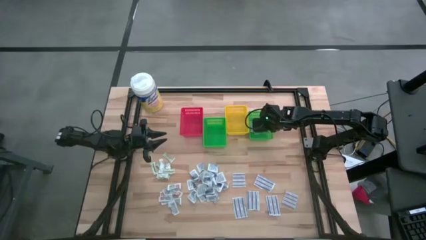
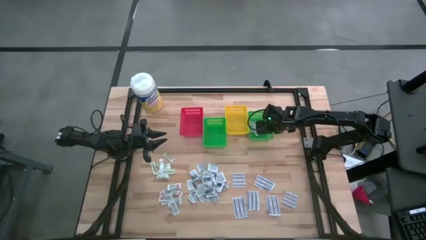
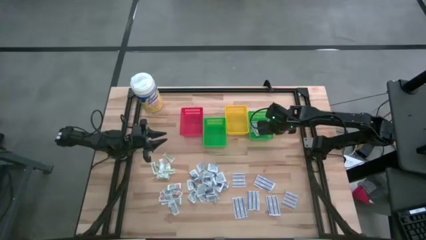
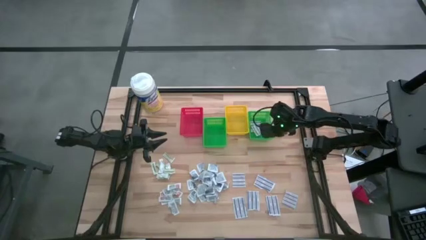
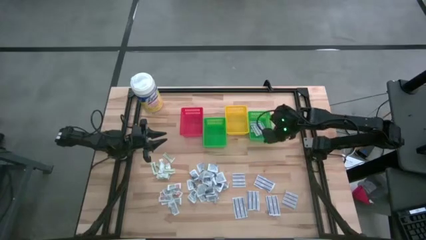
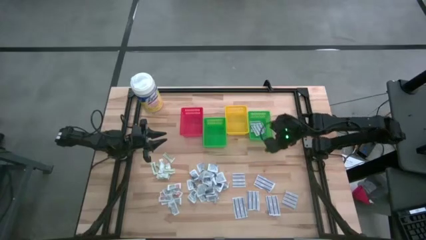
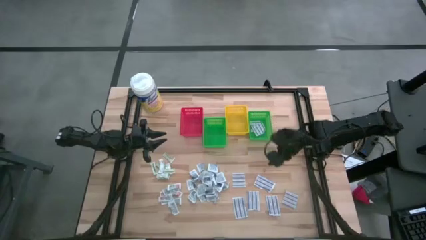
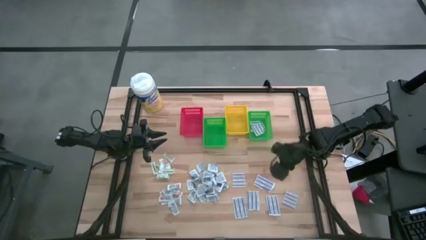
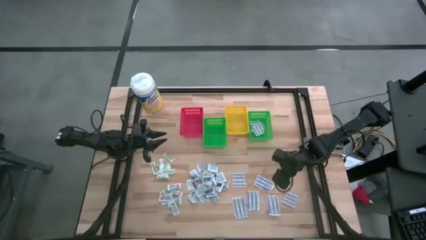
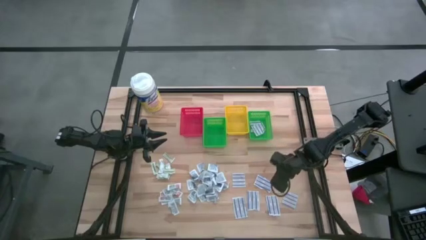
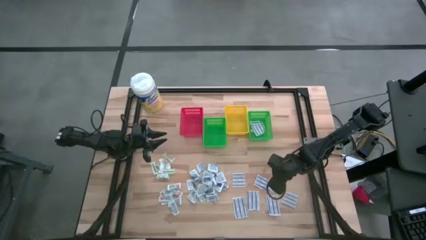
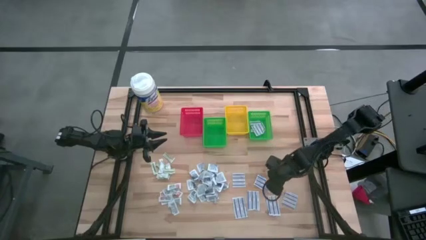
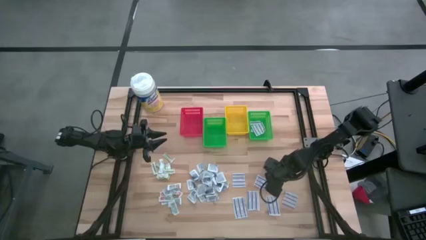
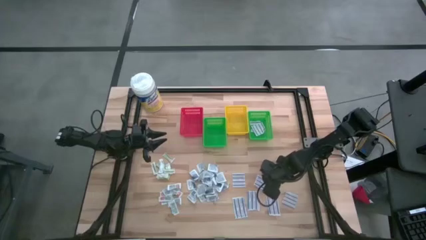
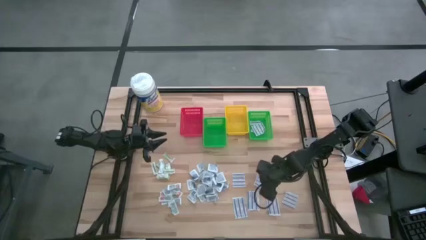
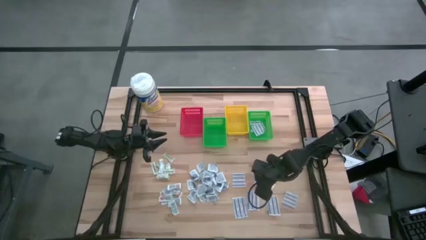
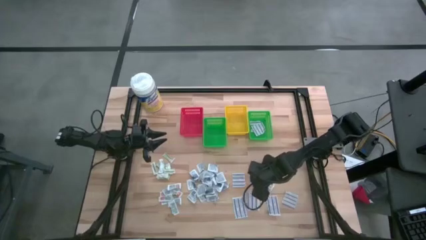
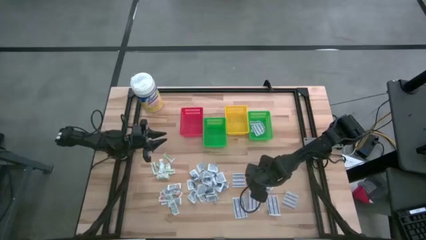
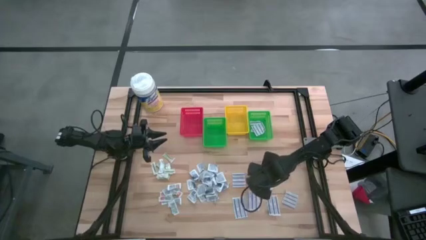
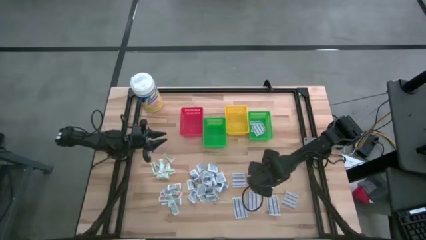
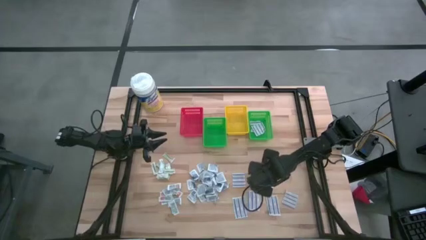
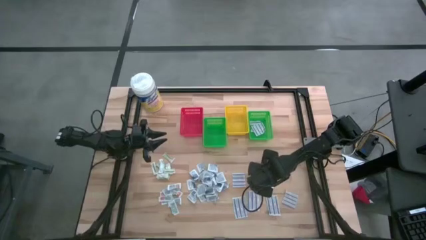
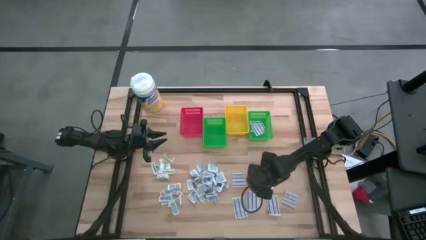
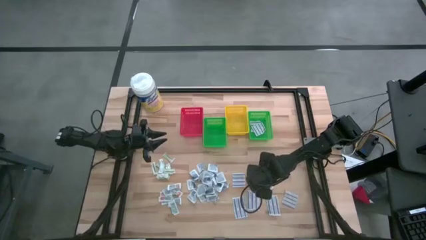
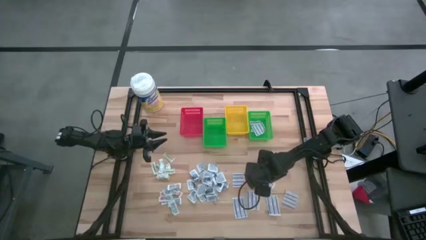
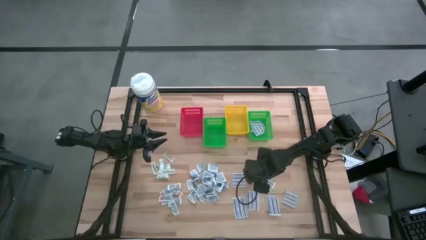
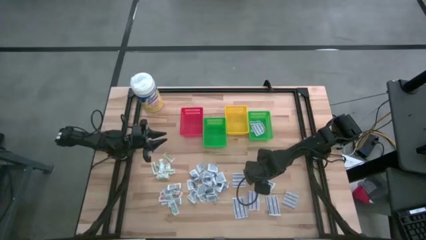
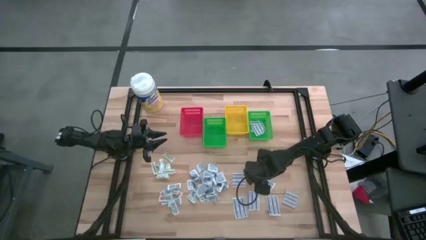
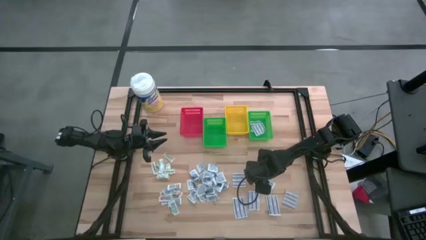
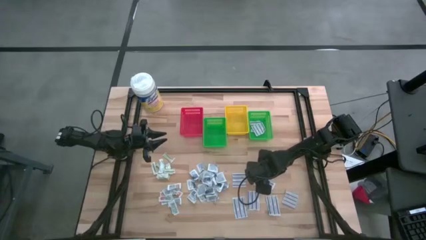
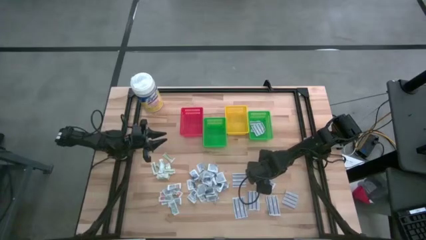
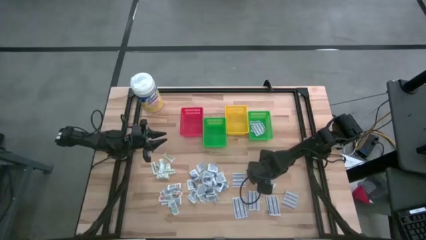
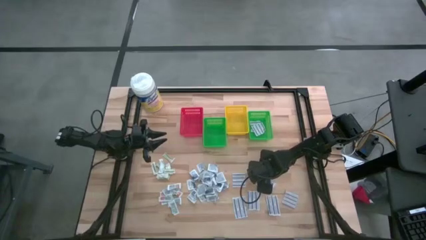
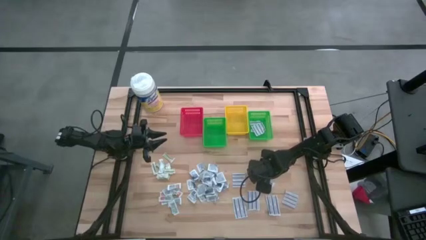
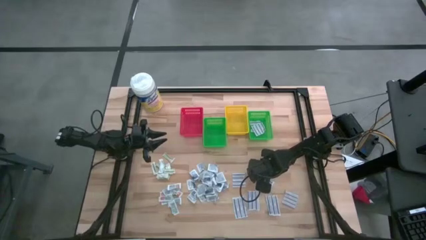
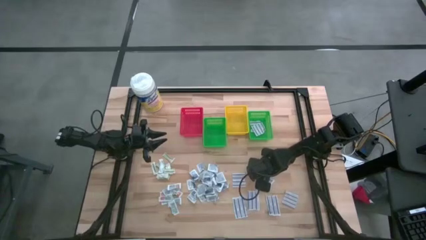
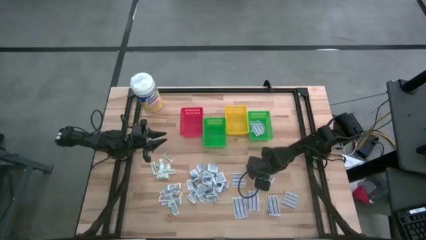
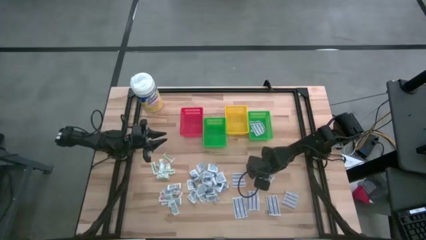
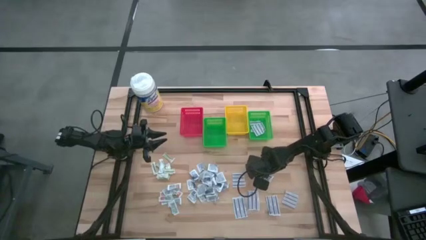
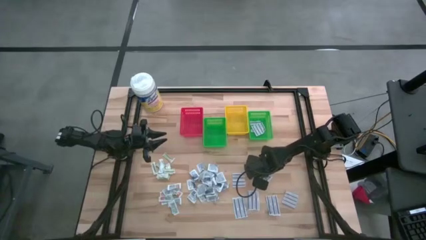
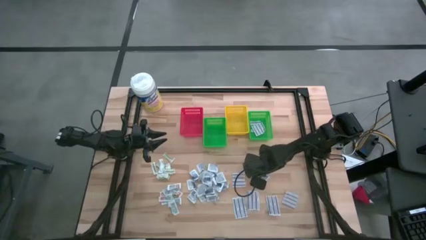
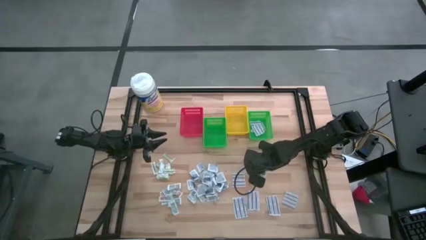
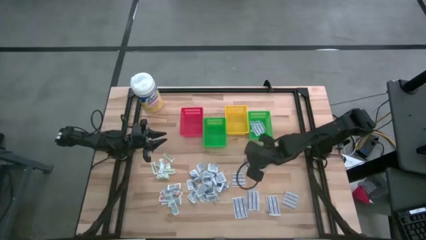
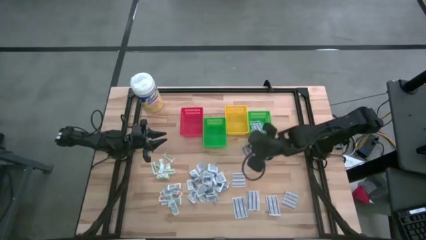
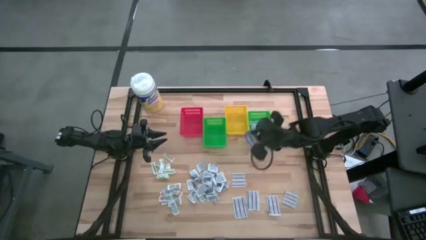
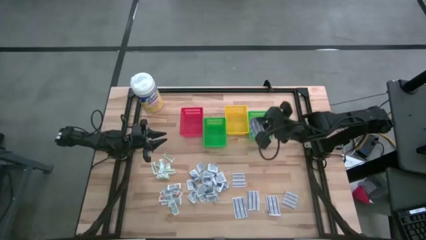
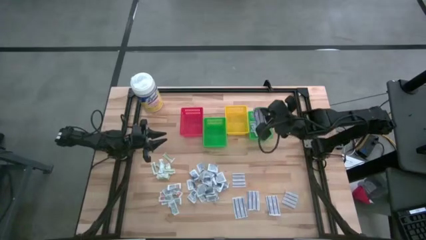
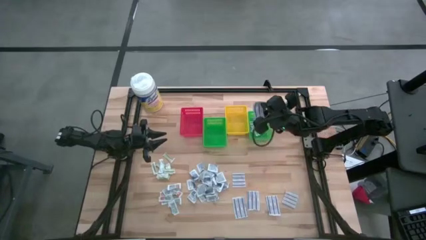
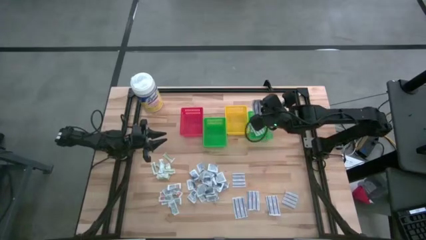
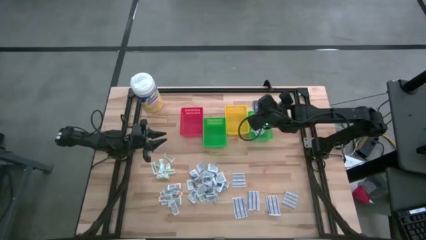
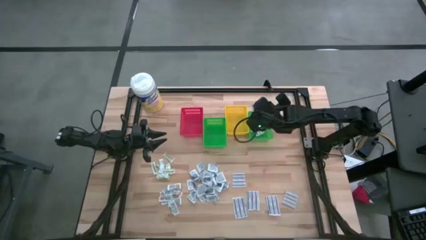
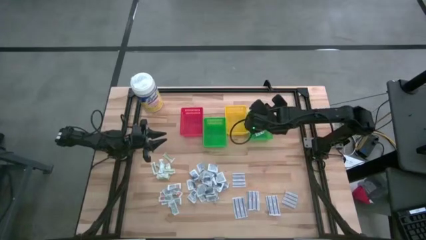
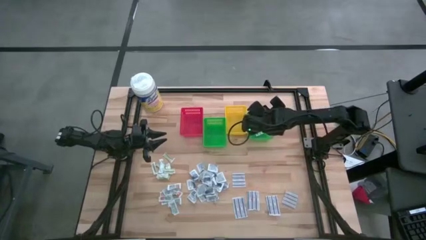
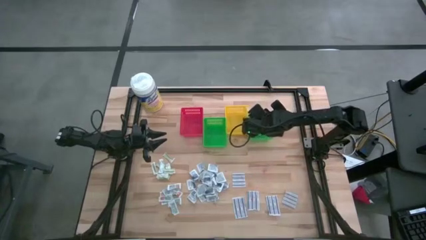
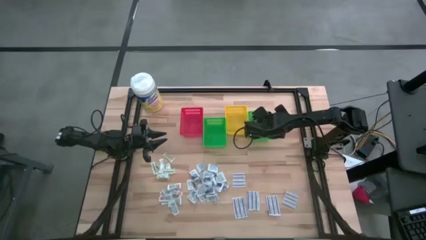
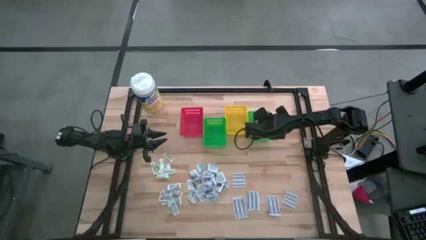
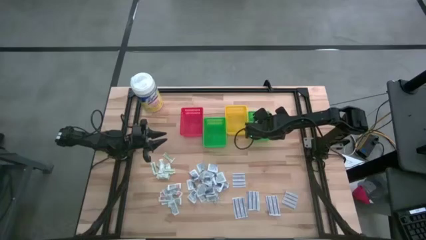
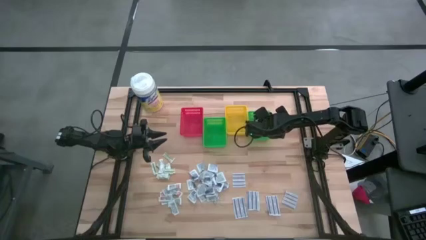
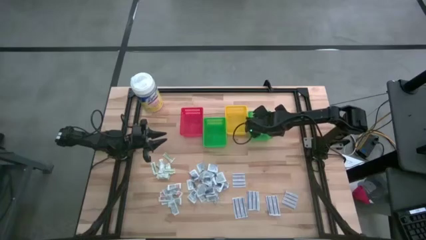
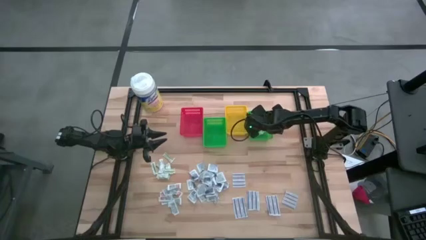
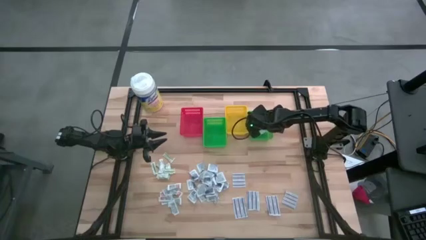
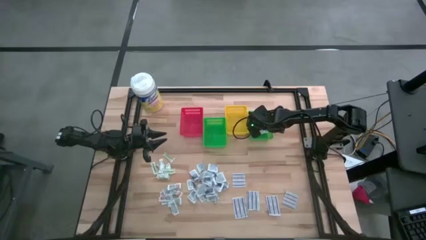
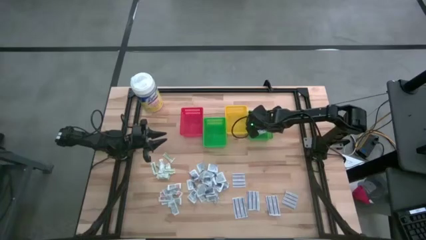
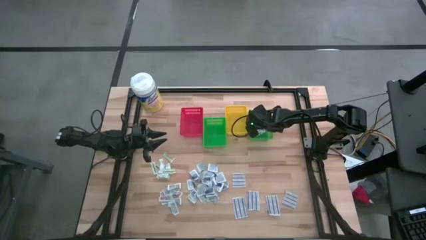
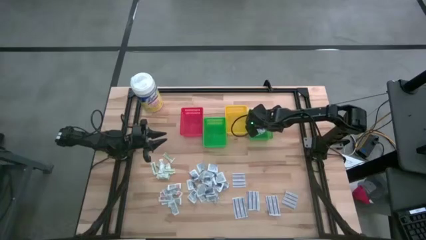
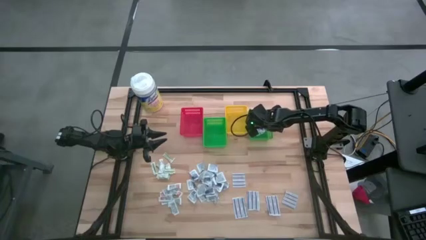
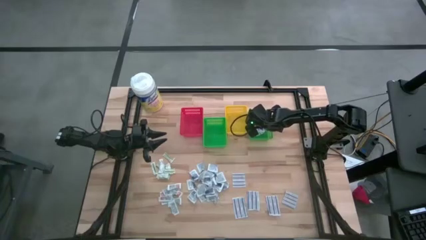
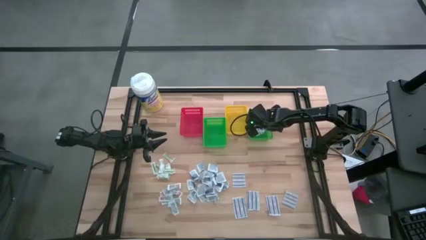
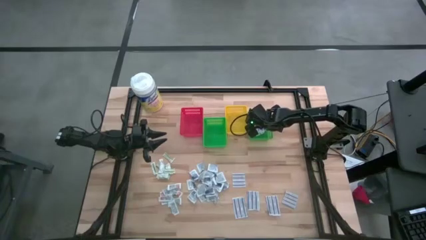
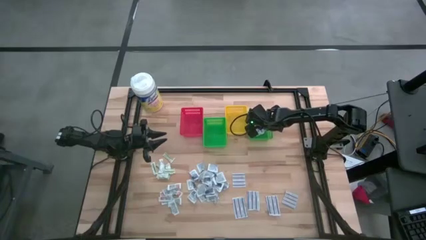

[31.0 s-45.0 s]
Task: Pick & Place First Aid Supplies
Put the blue bandage into the right green basket

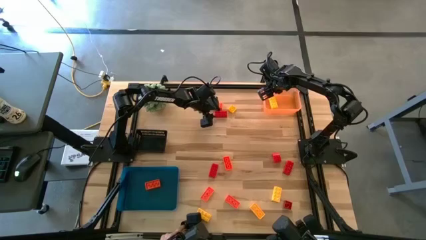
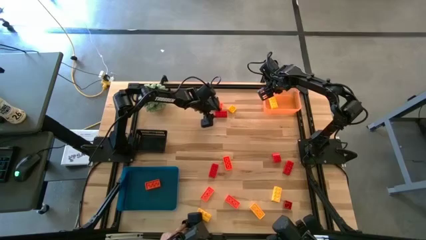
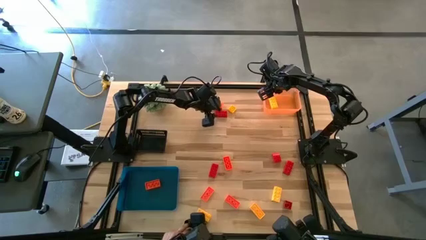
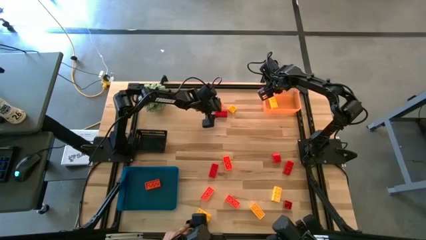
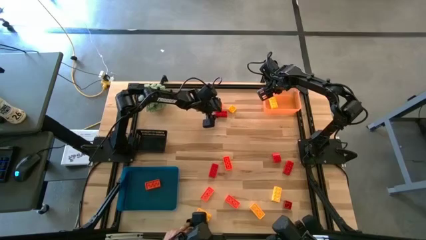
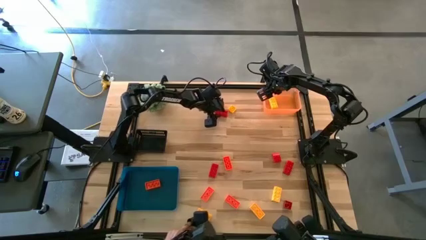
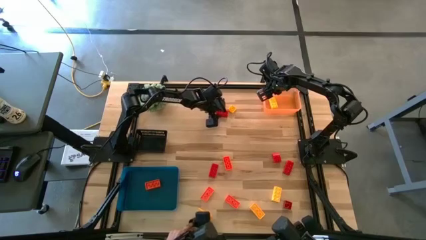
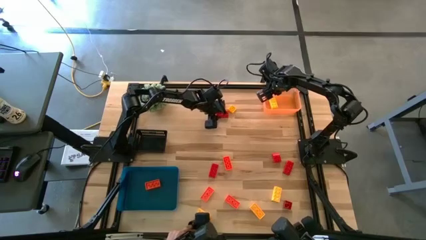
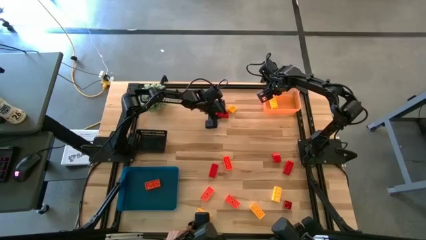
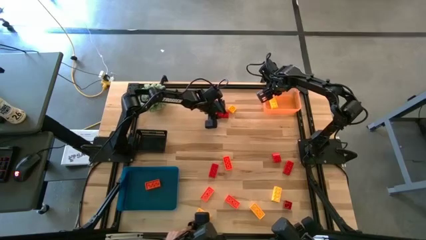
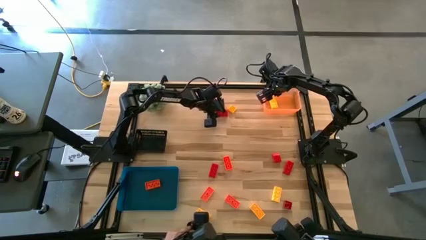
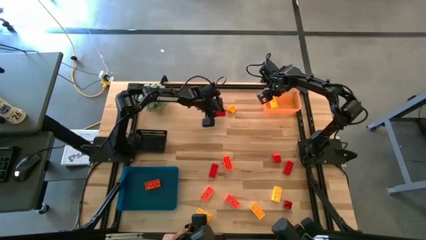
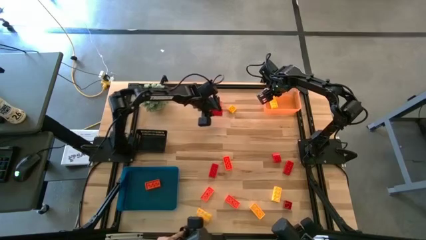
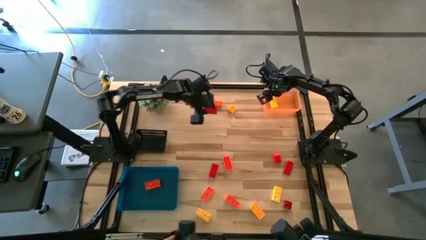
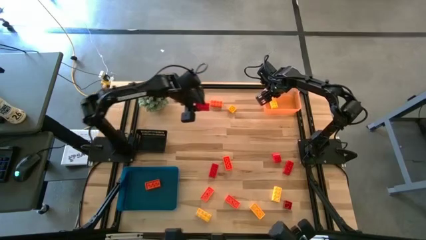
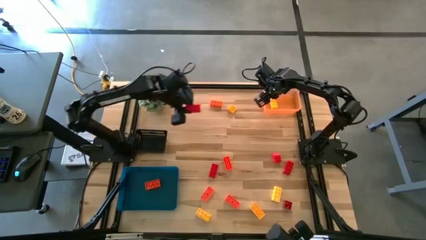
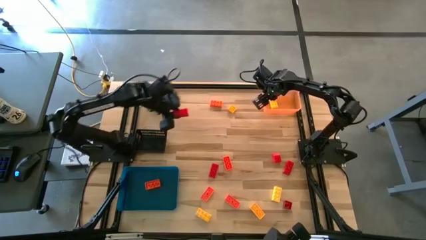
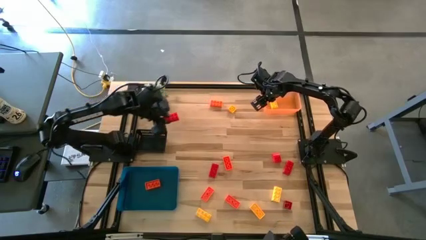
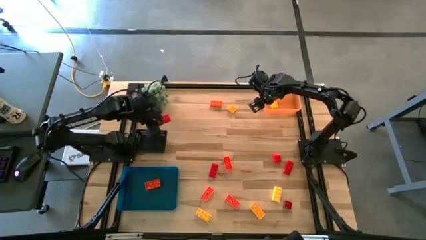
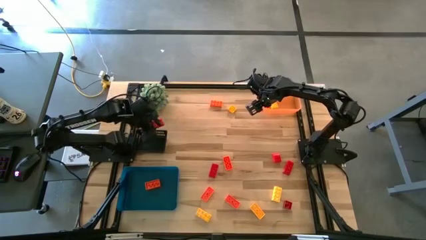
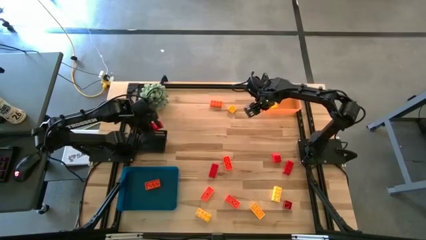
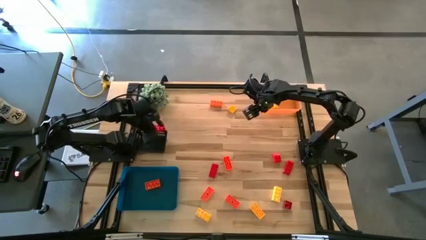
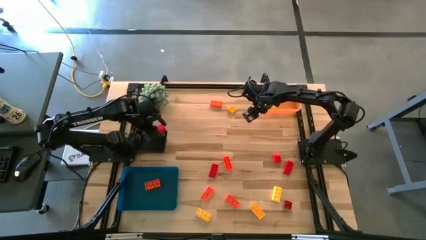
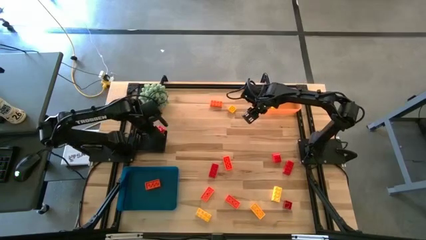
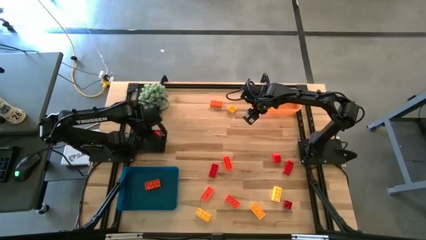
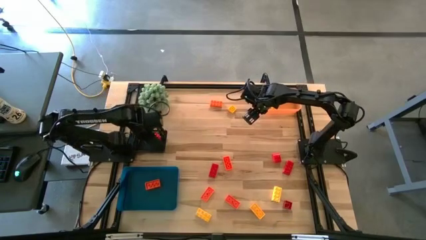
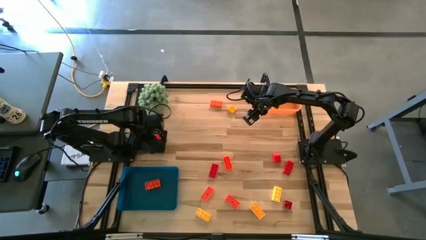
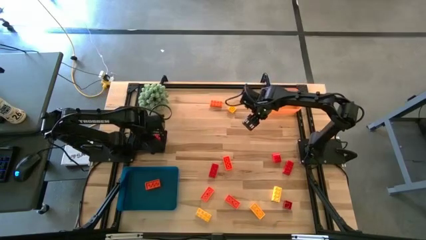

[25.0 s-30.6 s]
Task: Sort & place blocks by color
Put the red game piece into the black bin
